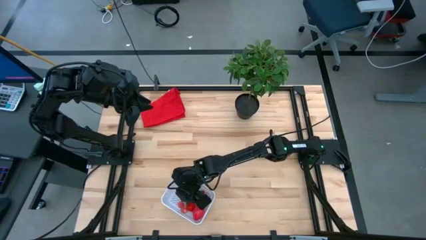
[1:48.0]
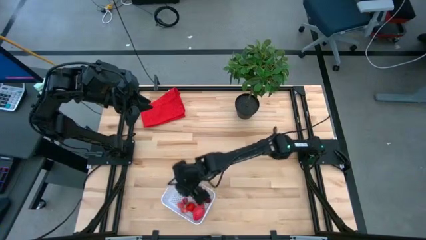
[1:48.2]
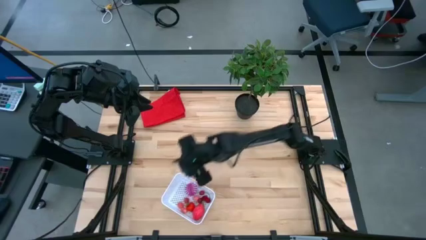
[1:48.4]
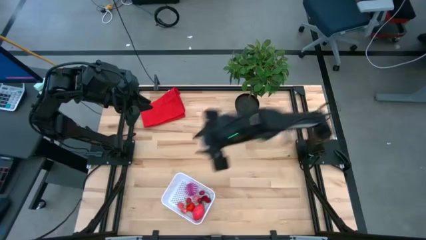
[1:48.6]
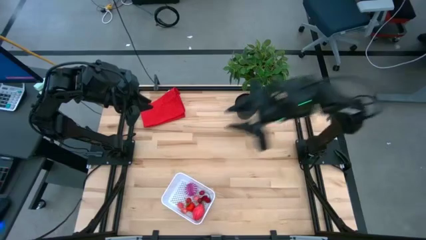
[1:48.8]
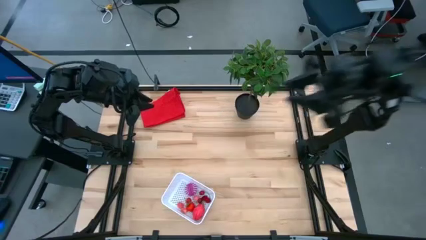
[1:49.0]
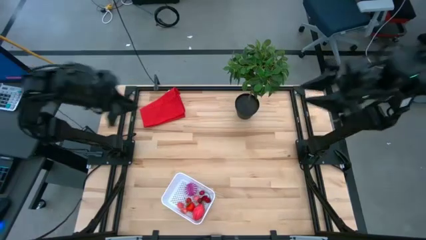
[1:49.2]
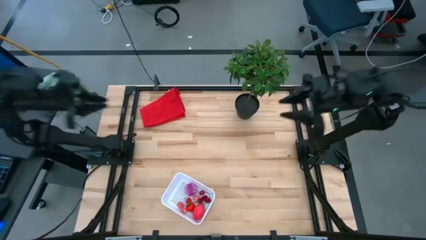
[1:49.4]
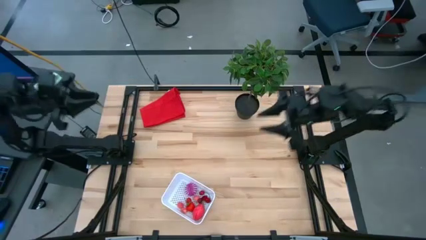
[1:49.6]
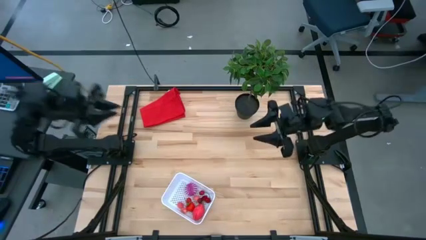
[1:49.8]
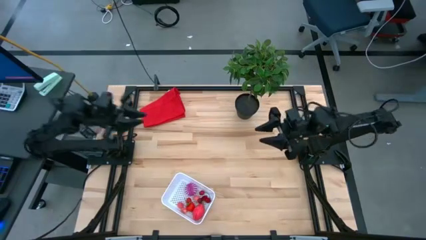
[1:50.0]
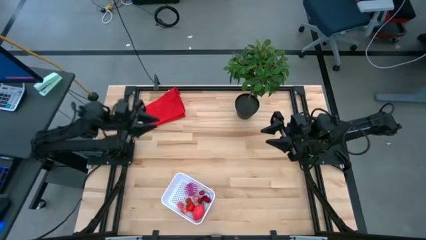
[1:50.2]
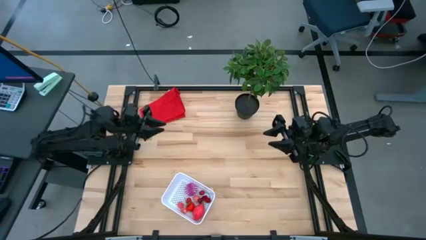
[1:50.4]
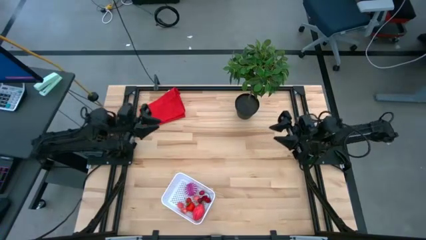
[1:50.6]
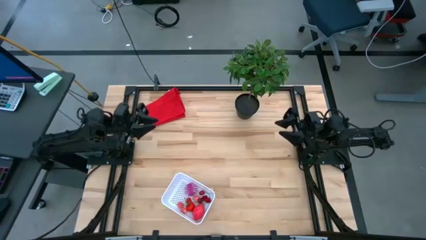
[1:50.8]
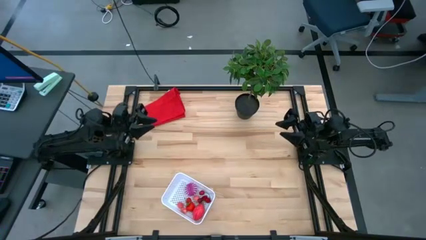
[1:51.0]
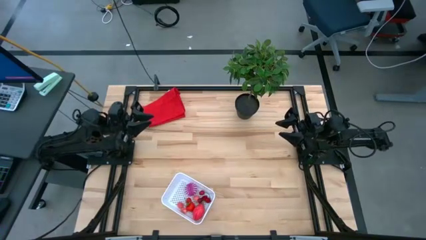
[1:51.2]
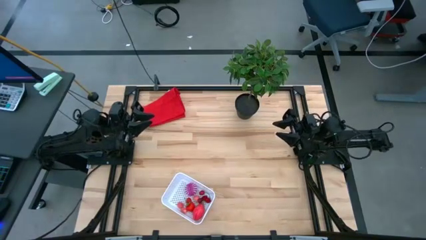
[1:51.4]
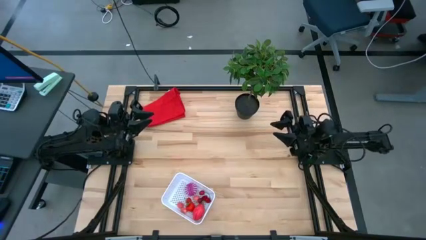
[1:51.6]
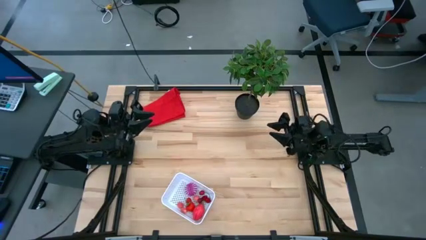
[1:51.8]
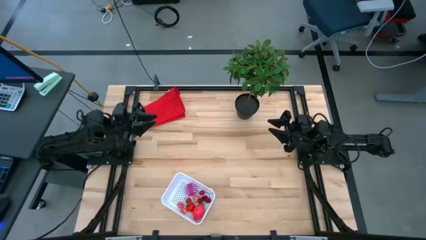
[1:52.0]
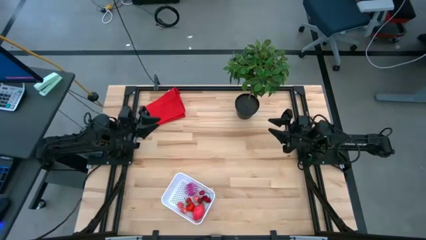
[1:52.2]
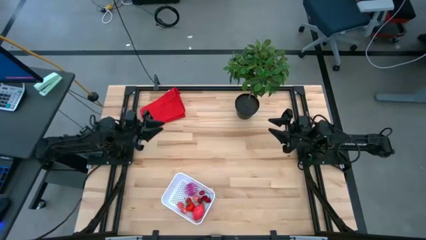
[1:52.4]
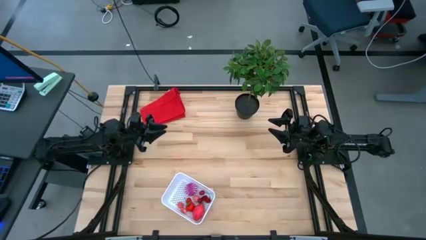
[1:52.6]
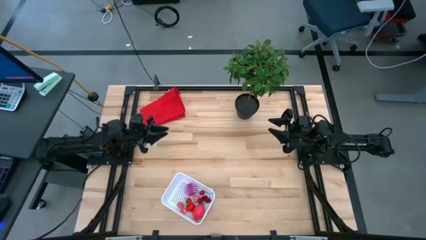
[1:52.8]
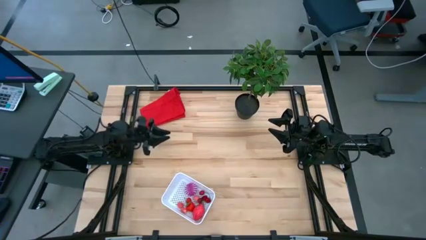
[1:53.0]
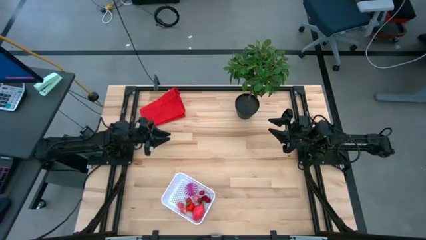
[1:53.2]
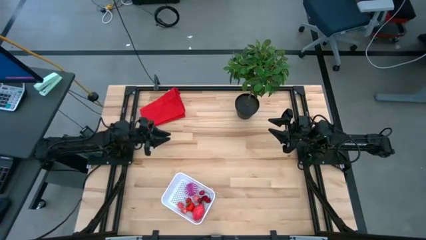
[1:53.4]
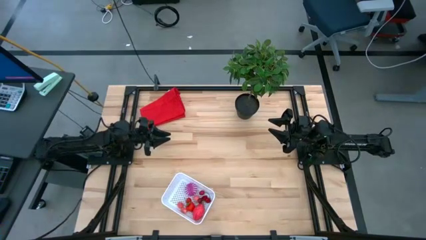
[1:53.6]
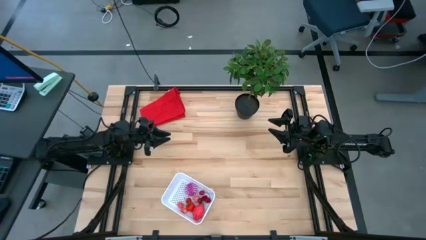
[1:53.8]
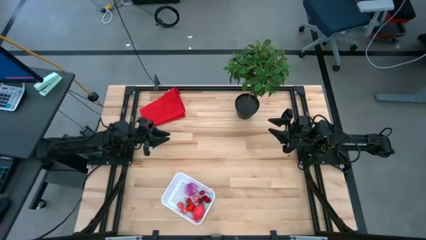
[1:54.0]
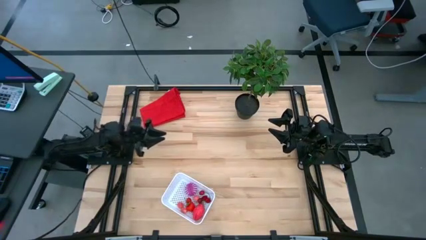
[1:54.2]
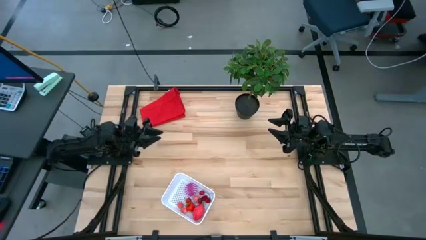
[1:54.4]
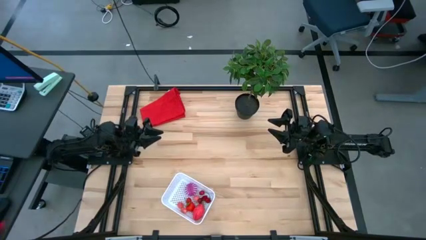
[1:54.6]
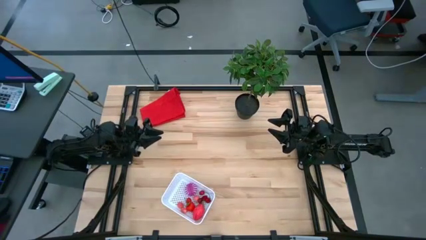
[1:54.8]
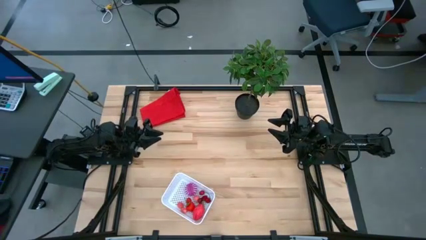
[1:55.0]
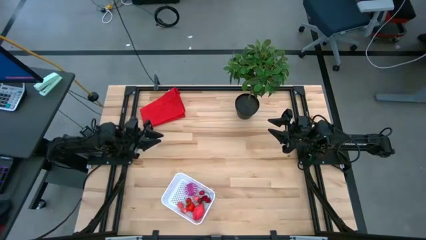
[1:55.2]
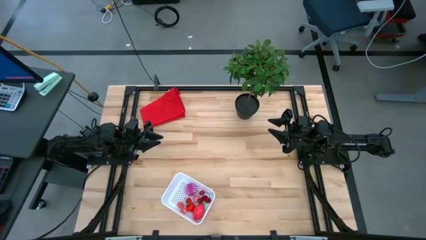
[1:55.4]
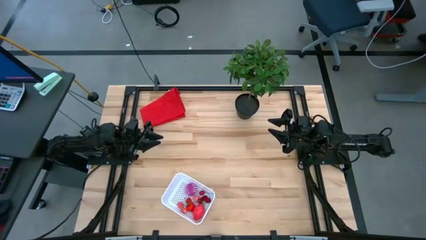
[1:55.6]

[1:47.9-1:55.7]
Task: Pick and placing Produce into tupperware
Return to Home Position

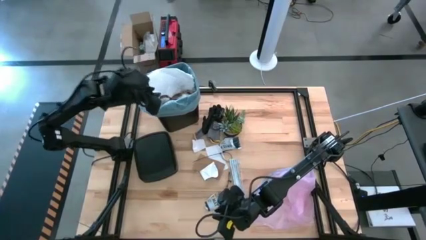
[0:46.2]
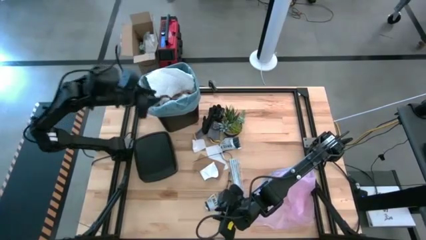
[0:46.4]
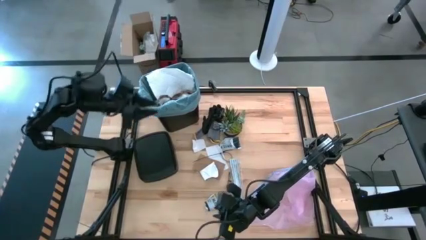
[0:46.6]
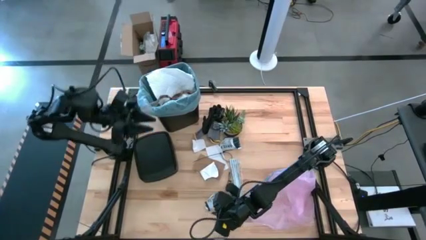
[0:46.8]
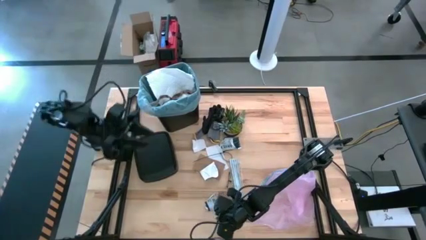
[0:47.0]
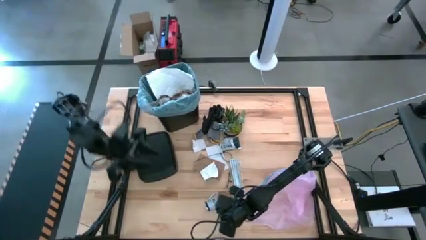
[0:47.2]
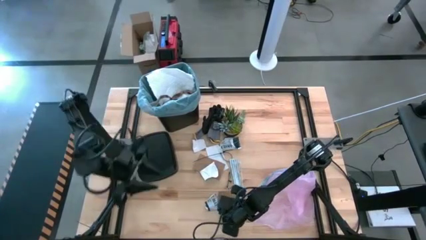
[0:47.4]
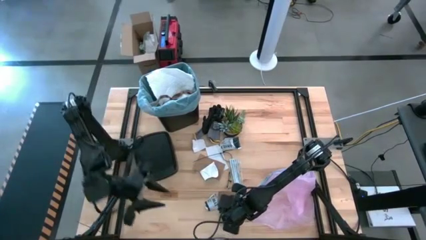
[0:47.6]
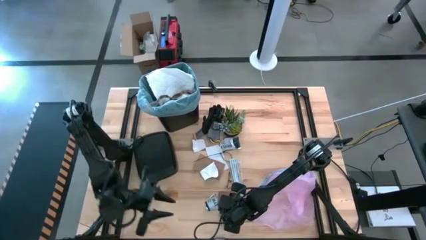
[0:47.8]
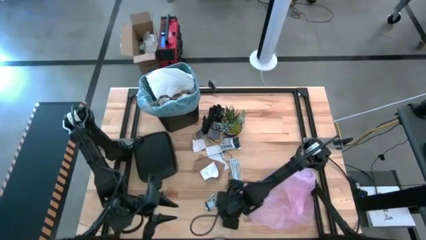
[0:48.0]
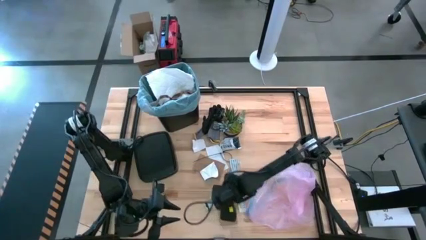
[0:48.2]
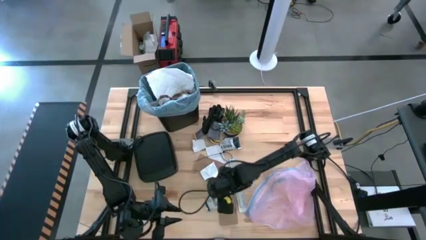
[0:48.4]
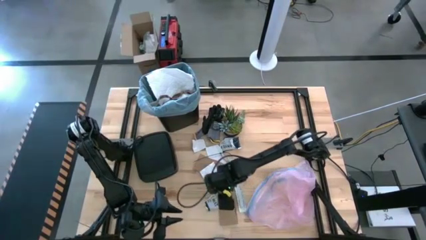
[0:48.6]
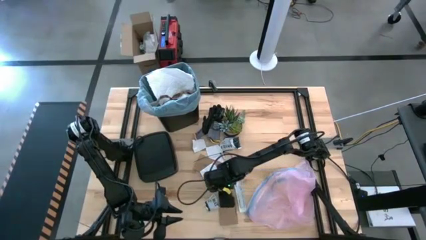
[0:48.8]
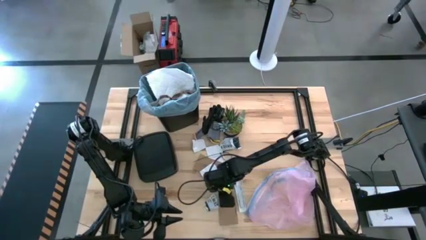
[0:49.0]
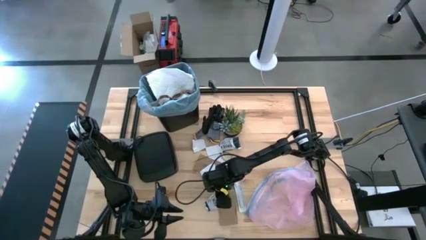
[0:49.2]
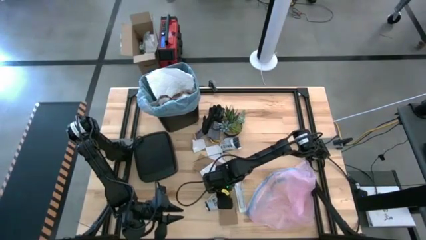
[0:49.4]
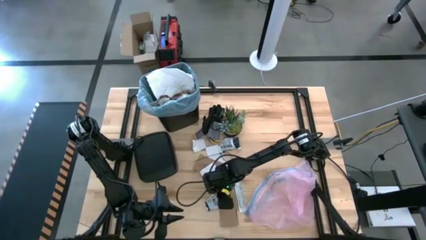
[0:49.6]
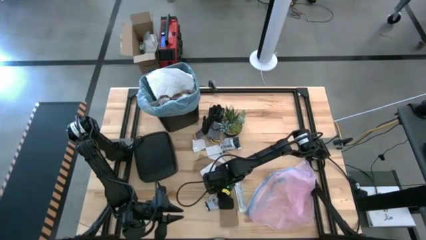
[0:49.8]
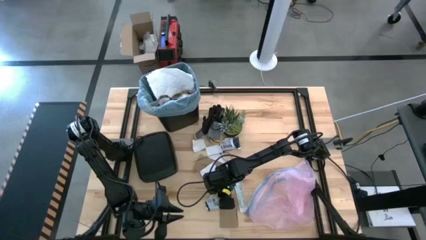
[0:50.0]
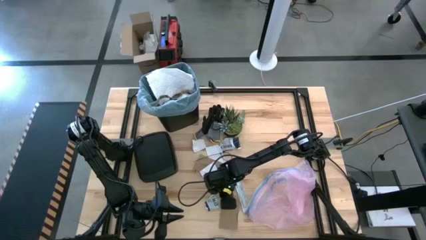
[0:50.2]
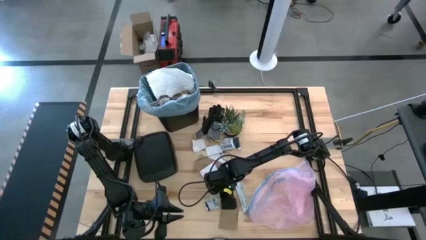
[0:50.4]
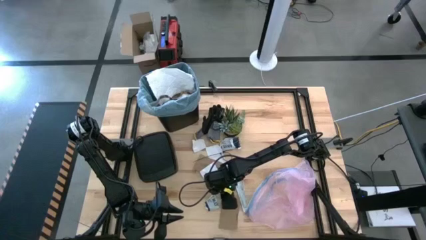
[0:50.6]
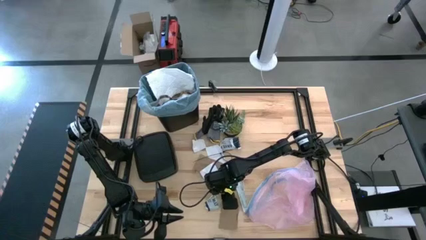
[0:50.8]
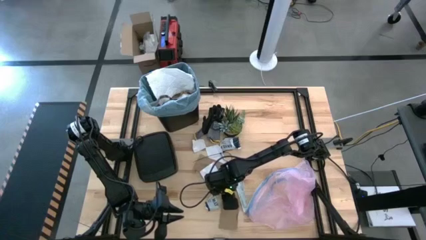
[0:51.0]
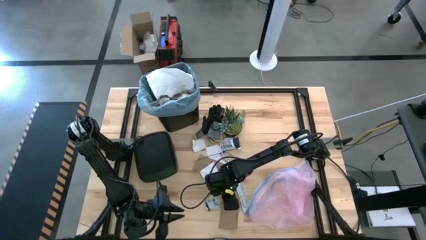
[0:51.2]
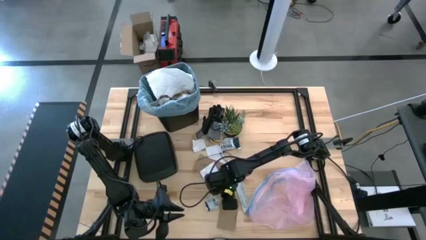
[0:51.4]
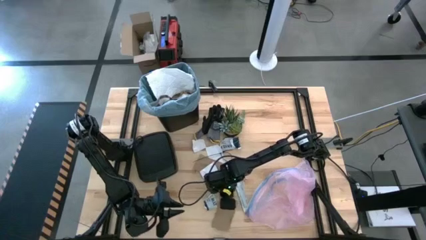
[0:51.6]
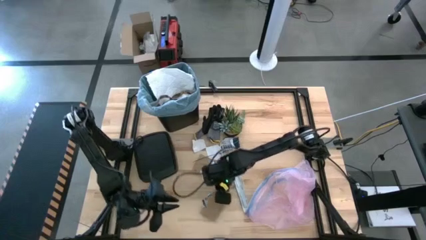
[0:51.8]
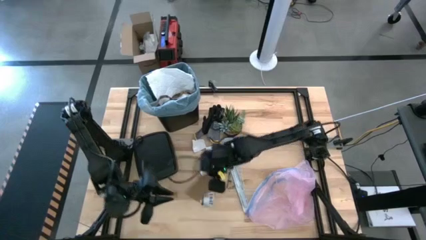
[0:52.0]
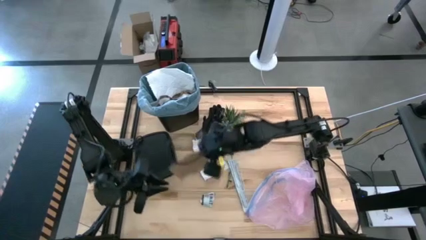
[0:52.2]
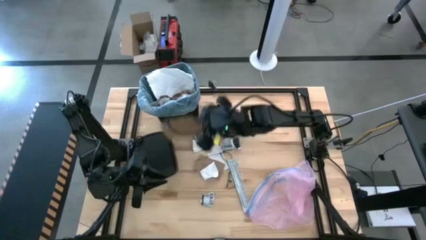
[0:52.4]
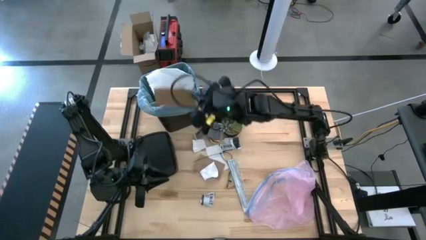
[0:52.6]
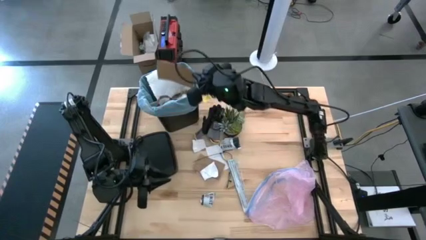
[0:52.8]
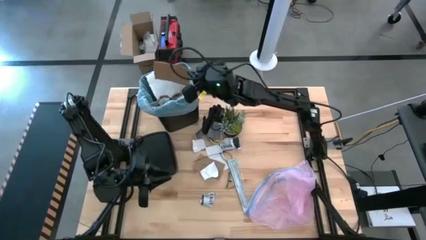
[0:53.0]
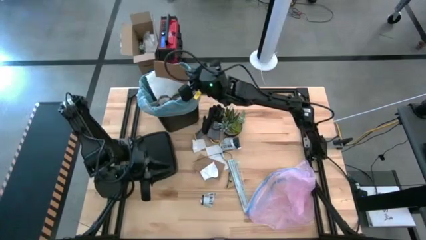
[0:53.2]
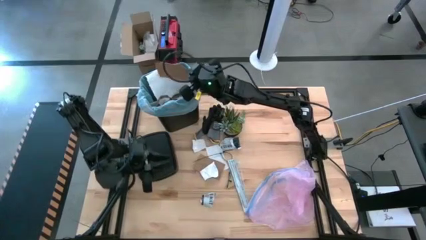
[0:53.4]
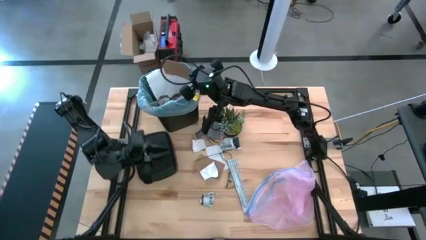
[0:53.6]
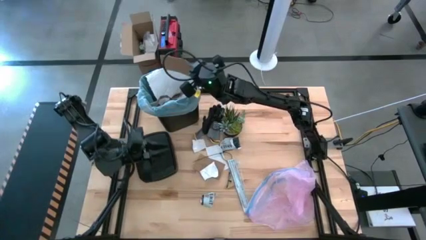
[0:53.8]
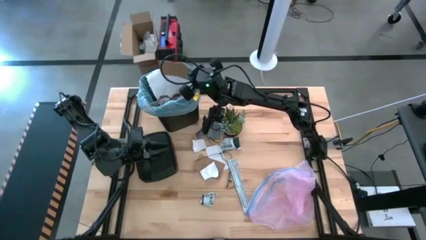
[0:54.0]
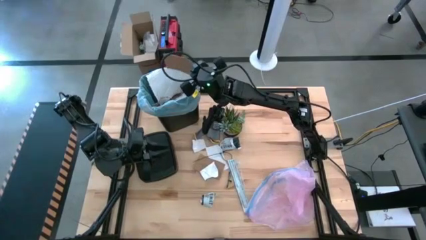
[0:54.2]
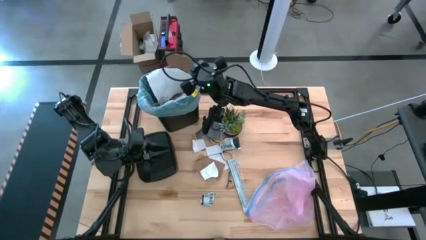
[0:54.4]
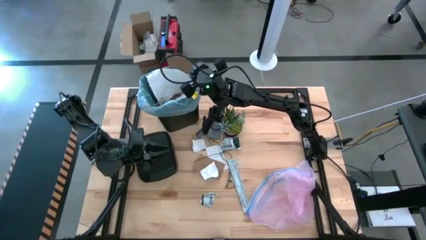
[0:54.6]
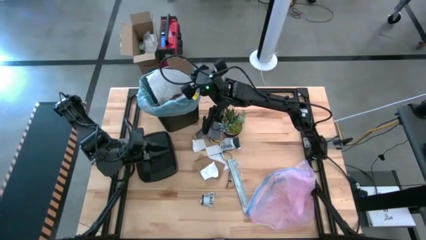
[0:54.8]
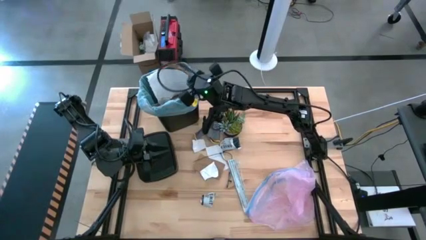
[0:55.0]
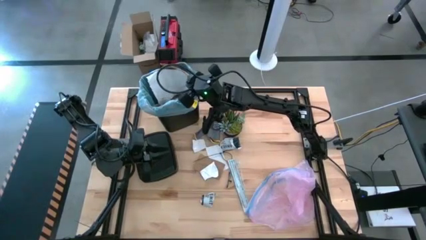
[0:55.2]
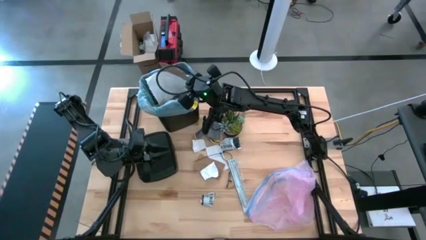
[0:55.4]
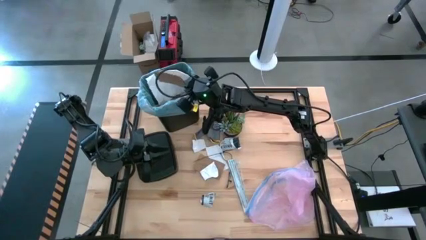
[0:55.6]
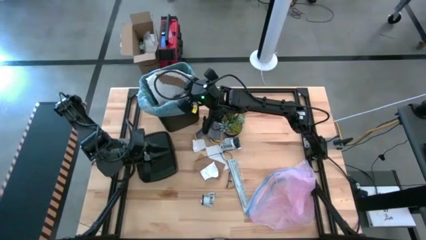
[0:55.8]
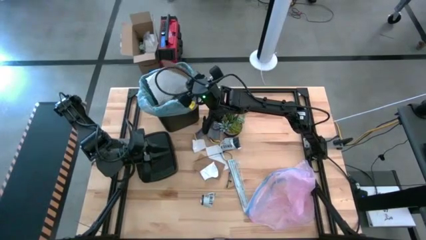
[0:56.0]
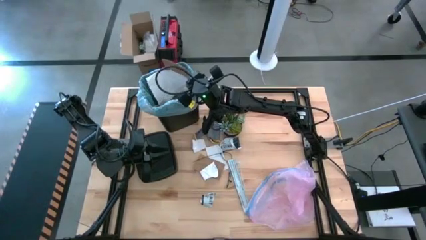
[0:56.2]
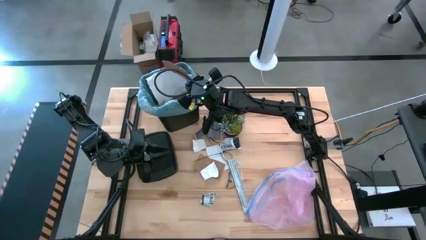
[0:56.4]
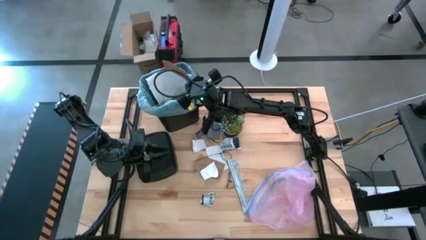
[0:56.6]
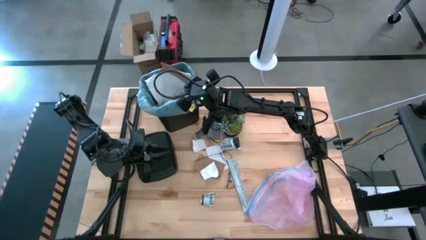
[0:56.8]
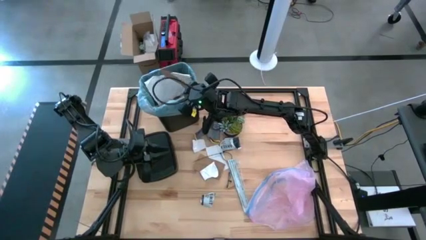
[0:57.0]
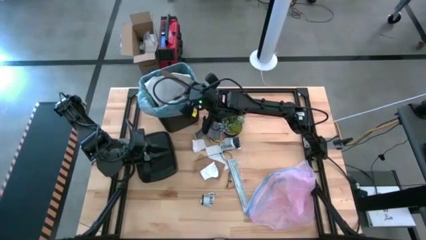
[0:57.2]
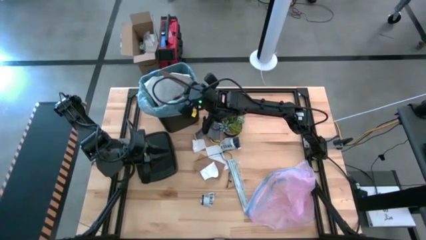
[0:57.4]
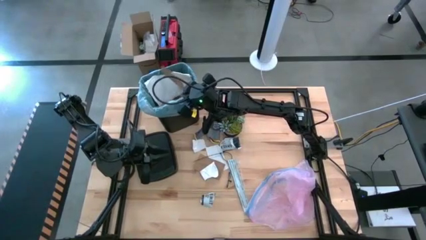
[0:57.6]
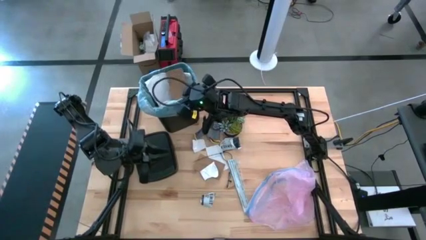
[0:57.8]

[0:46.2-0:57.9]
Task: place trash/remove bag and relplace
Put the brown cardboard into the trash bin
